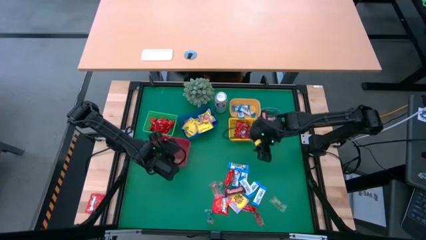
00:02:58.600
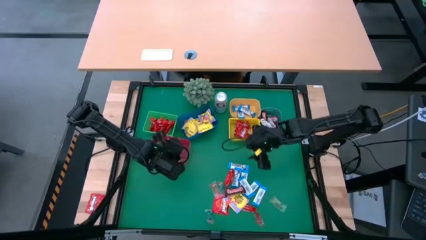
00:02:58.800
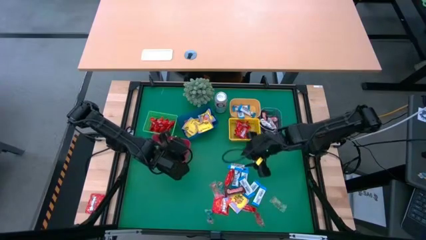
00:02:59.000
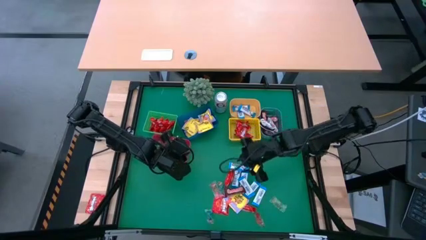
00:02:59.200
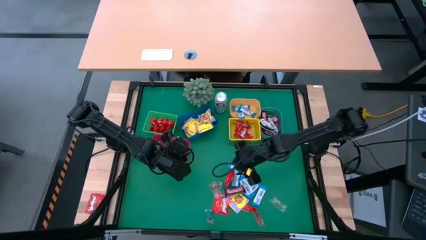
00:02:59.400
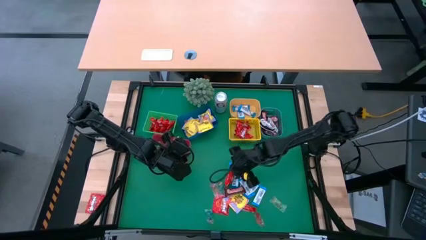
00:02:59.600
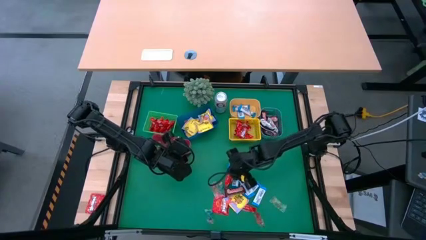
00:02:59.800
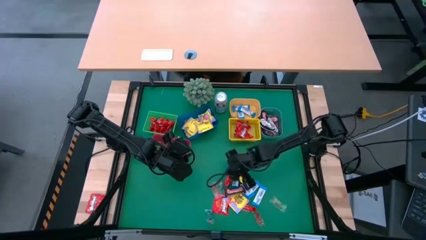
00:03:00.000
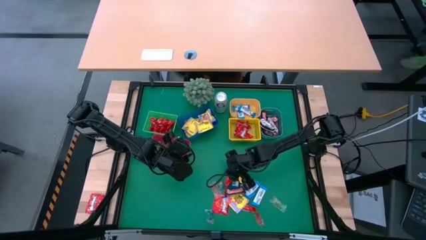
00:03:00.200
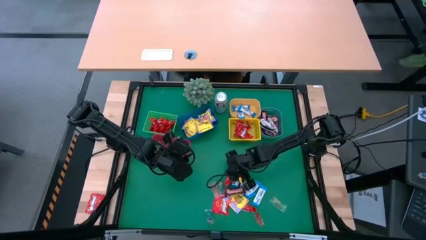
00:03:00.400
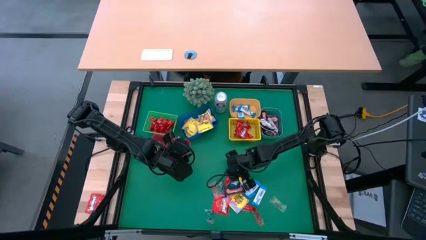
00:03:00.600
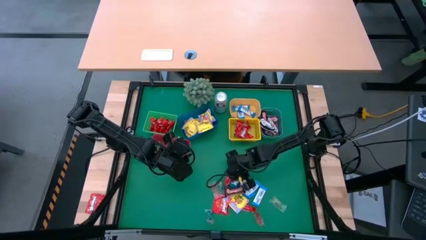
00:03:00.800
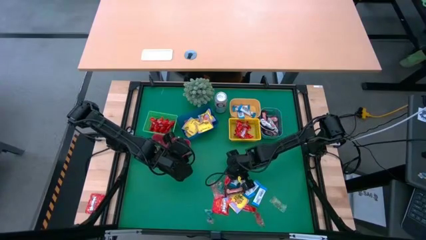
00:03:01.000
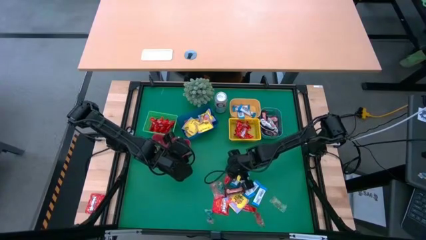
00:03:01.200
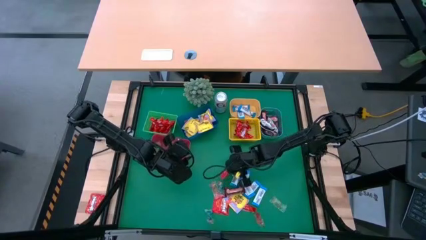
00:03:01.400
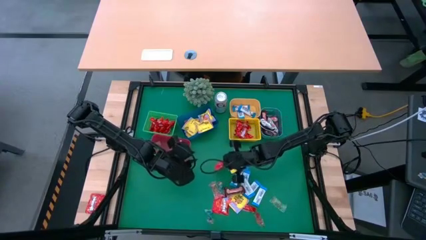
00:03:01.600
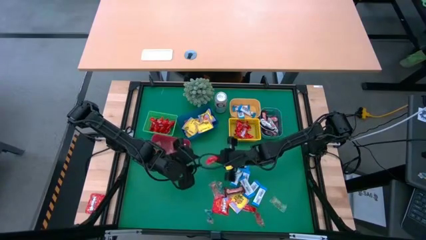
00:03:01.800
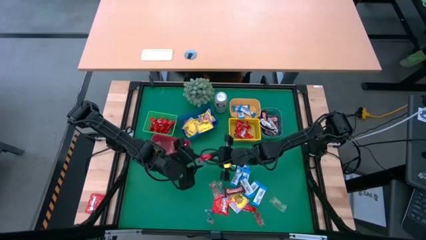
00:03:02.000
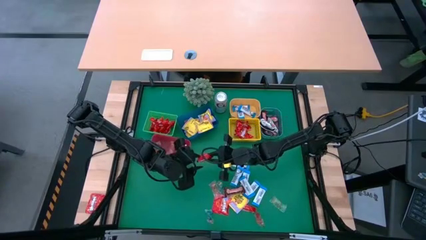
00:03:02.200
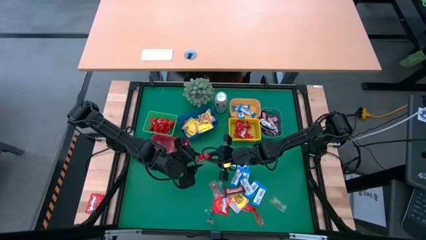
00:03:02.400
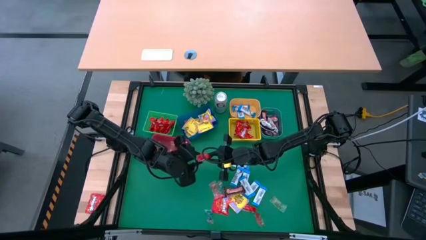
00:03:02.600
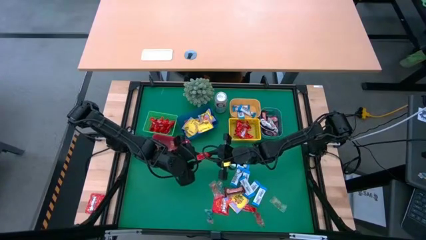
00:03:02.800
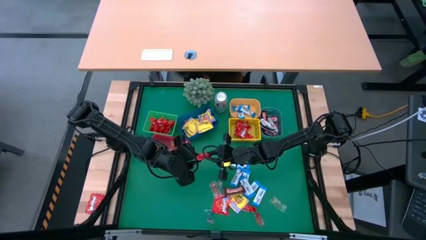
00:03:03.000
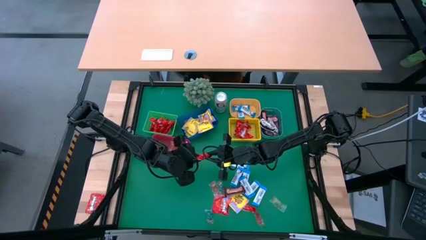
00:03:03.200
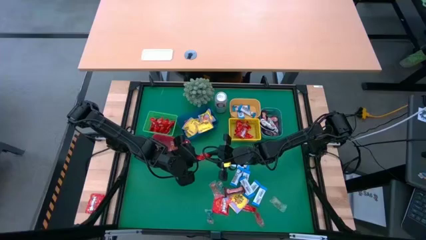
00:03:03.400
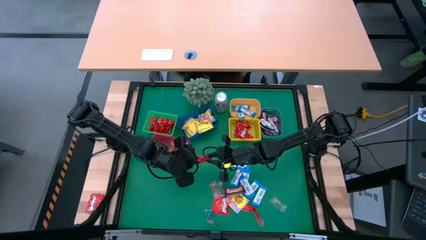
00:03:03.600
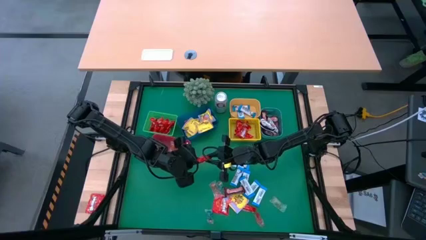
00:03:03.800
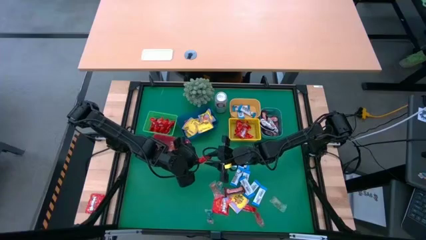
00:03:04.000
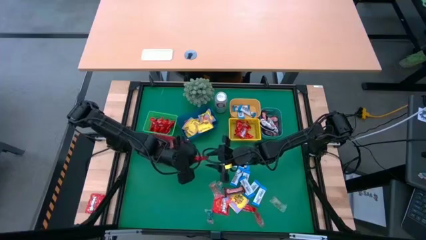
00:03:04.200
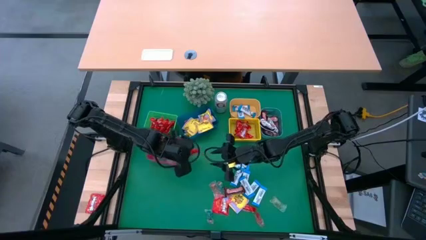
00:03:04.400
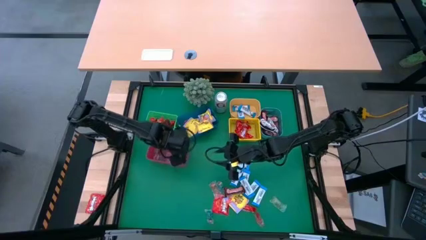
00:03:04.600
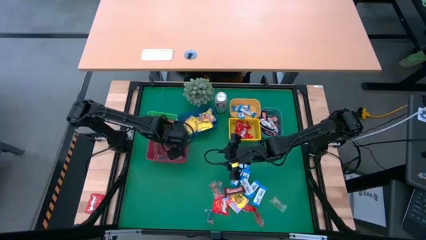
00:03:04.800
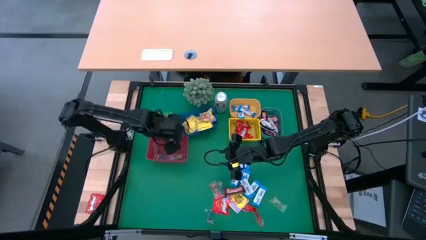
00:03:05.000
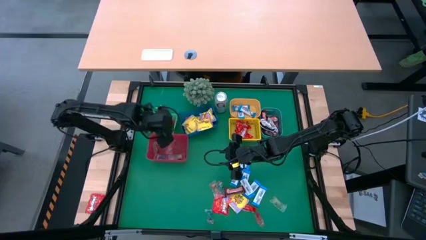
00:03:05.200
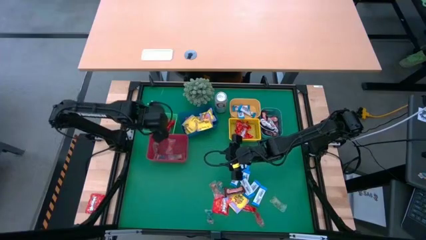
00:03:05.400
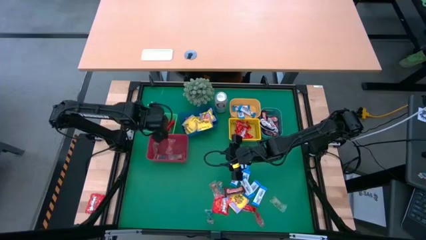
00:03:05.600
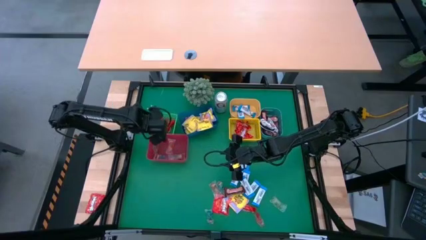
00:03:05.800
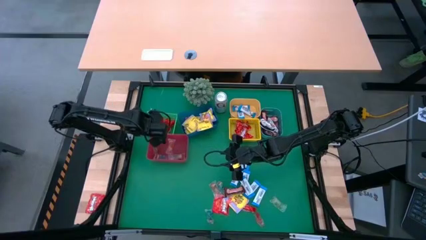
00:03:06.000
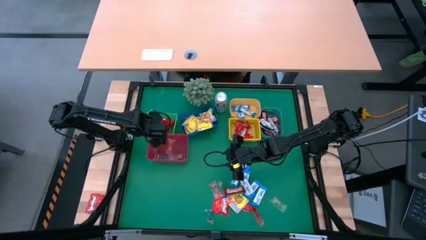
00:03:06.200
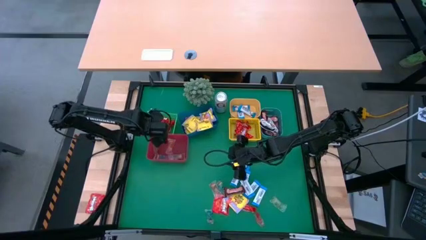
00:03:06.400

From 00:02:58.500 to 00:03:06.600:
Task: Sort candy
Put the red chocolate bar into the green bin

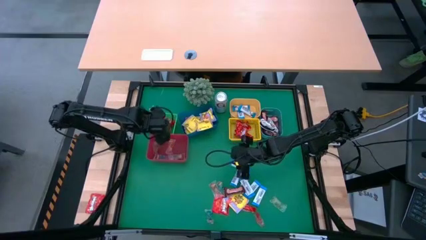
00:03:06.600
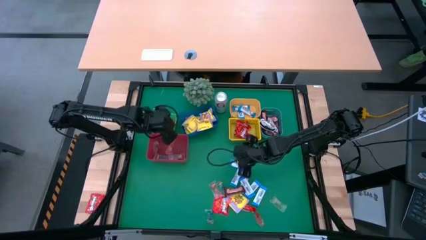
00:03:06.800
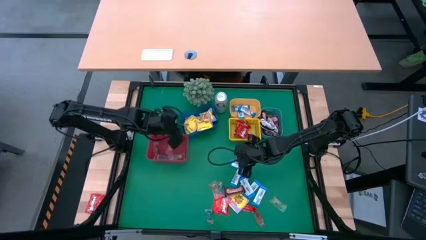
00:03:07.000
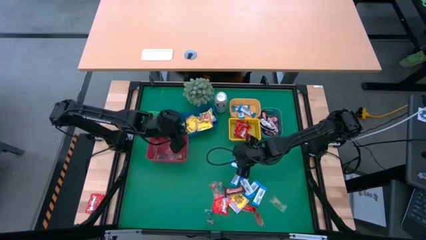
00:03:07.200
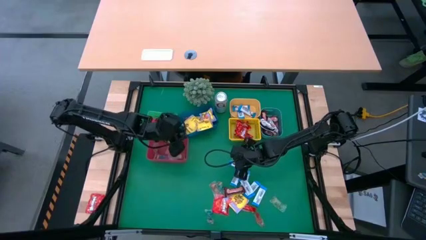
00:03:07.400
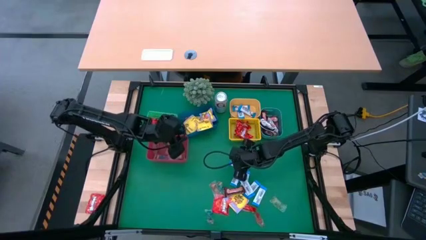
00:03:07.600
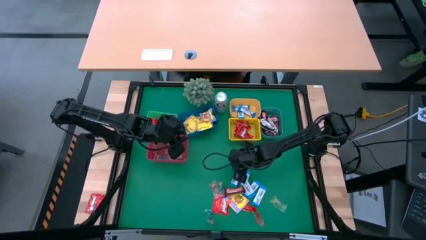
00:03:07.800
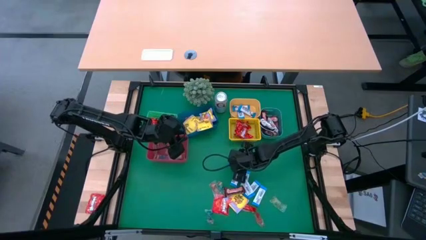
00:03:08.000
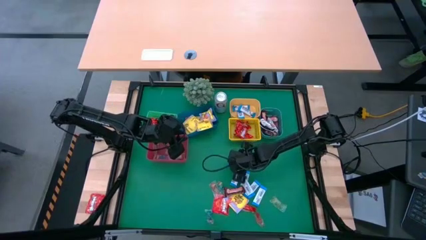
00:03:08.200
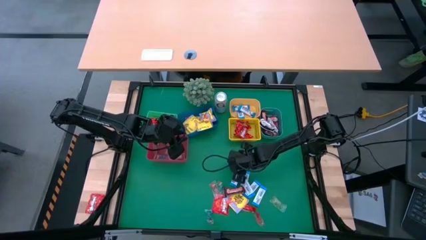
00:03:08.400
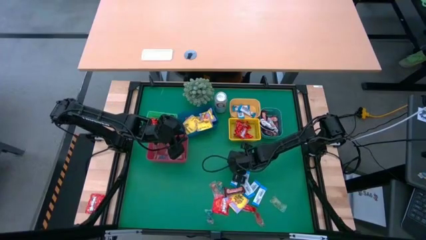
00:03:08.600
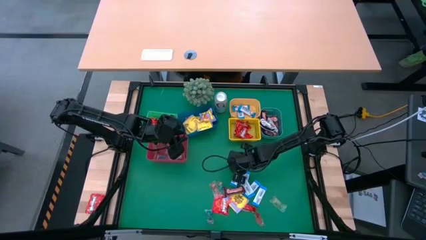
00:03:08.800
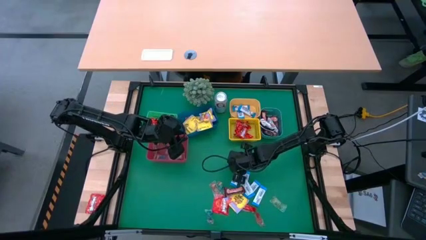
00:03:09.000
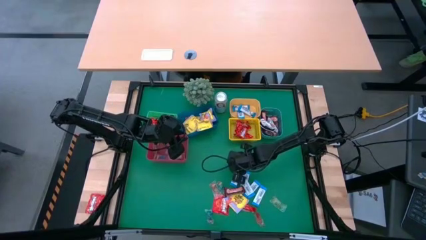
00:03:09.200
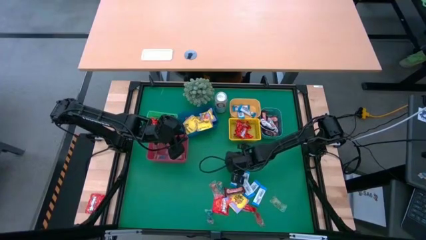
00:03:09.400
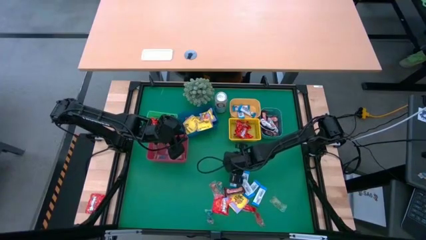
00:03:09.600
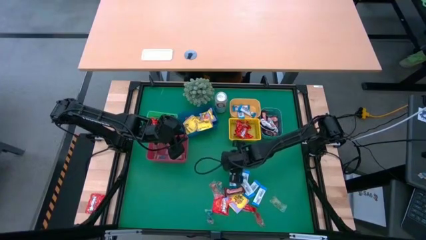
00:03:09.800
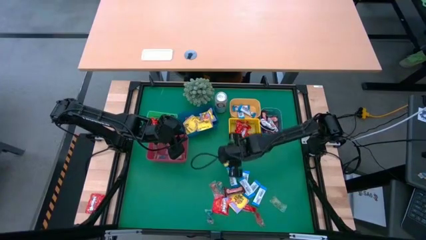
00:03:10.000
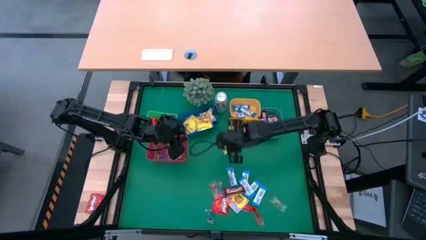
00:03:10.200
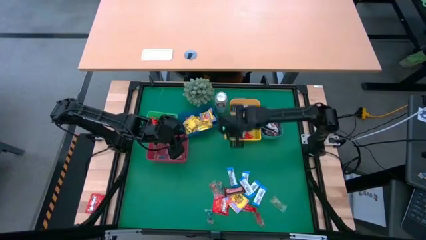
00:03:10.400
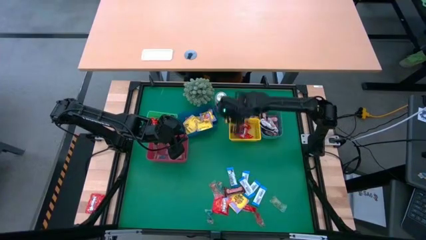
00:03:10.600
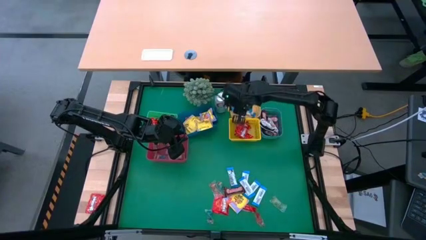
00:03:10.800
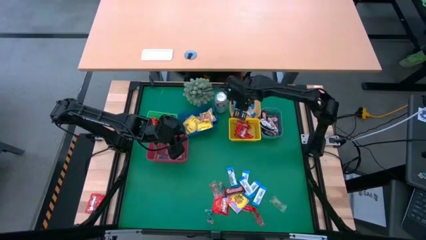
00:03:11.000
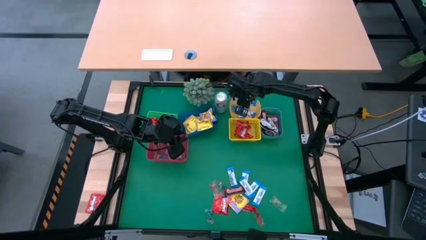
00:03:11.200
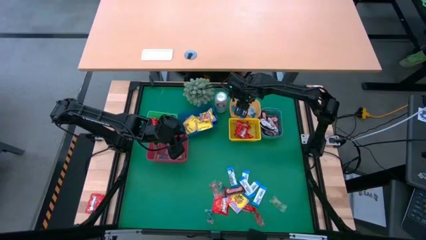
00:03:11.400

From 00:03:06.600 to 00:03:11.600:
Put the blue chocolate bar into the orange bin
